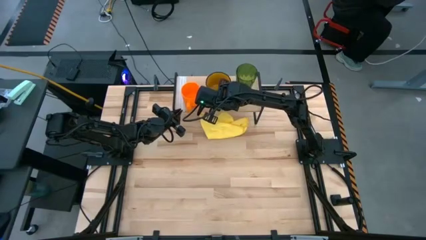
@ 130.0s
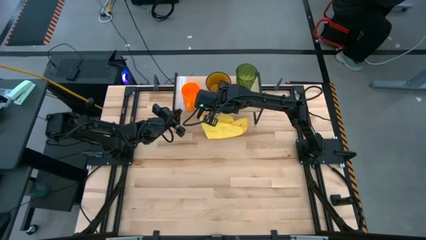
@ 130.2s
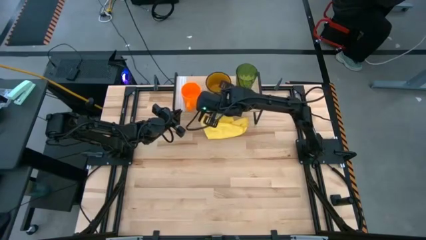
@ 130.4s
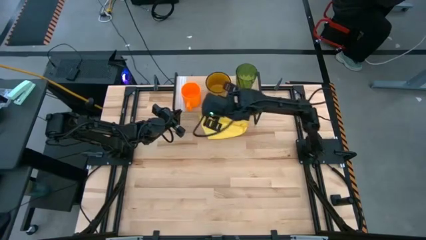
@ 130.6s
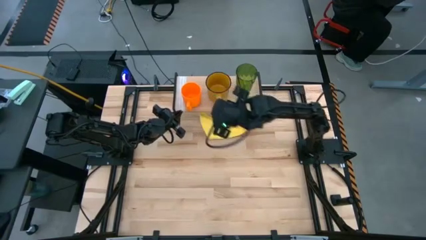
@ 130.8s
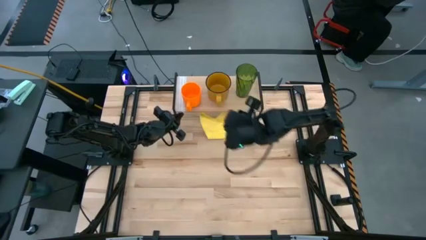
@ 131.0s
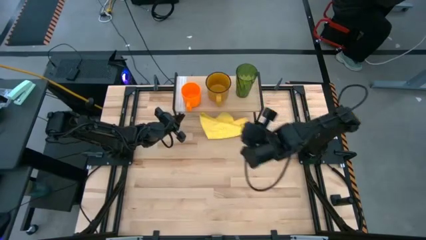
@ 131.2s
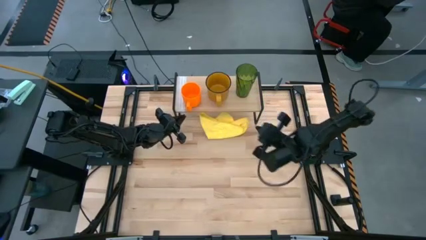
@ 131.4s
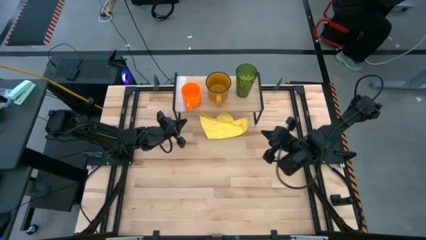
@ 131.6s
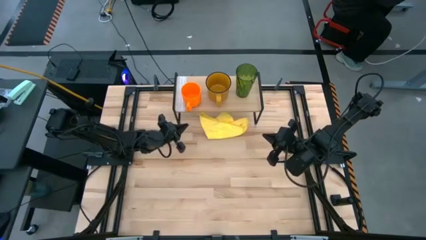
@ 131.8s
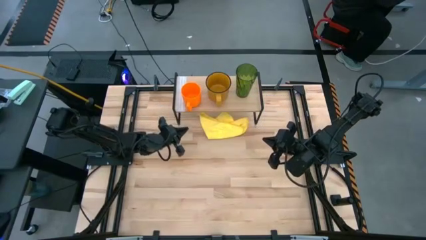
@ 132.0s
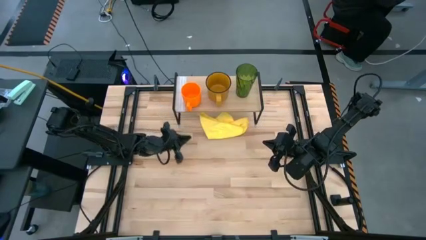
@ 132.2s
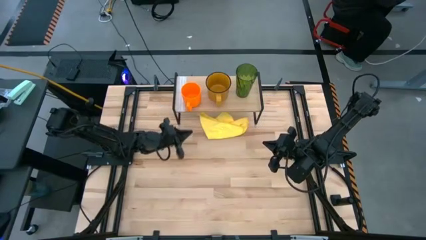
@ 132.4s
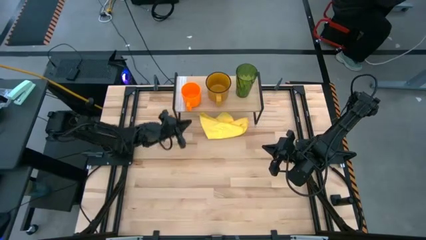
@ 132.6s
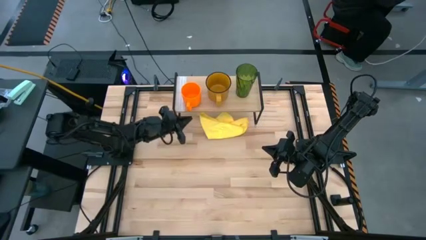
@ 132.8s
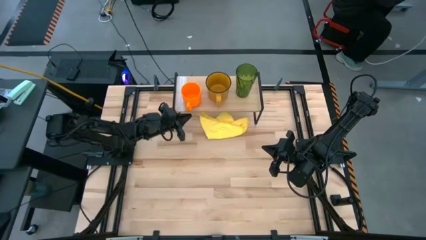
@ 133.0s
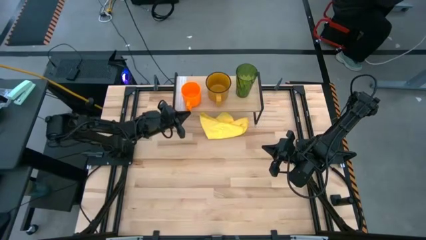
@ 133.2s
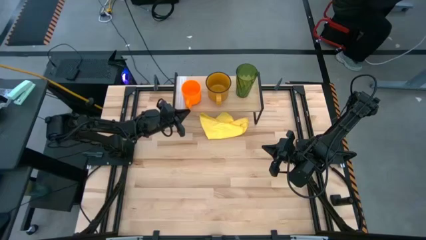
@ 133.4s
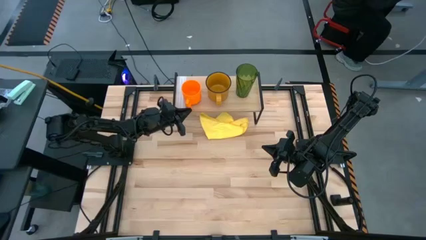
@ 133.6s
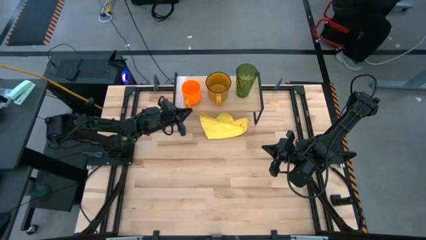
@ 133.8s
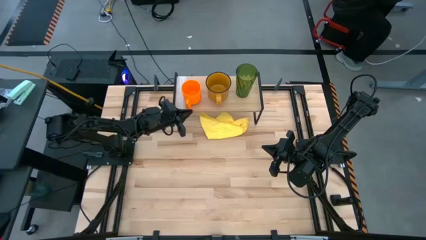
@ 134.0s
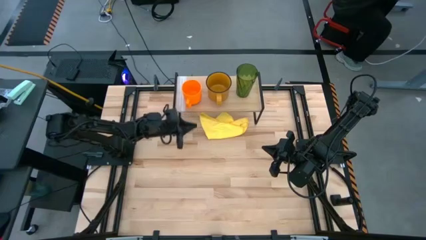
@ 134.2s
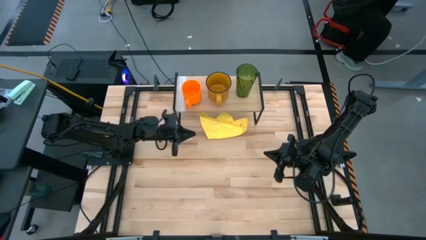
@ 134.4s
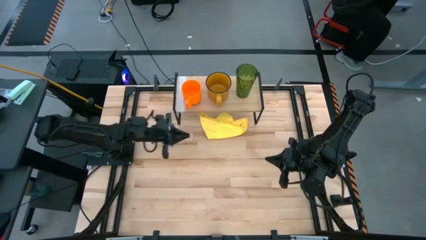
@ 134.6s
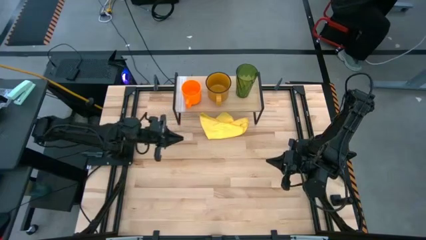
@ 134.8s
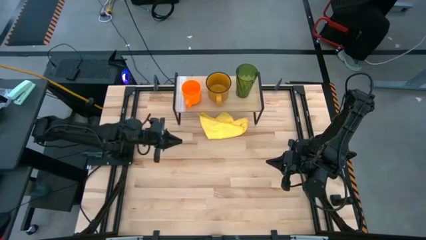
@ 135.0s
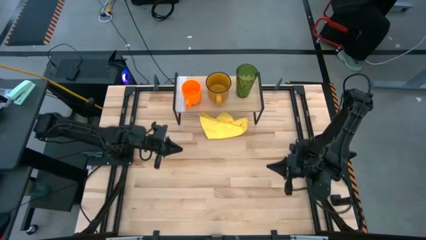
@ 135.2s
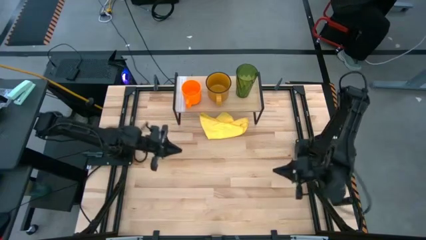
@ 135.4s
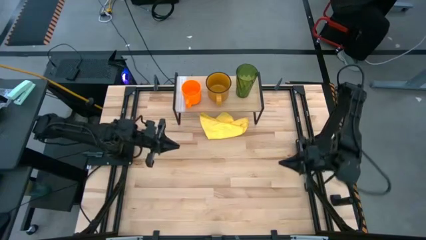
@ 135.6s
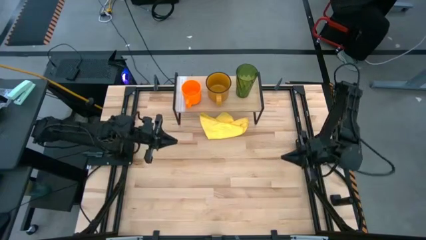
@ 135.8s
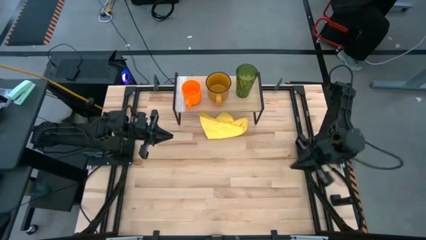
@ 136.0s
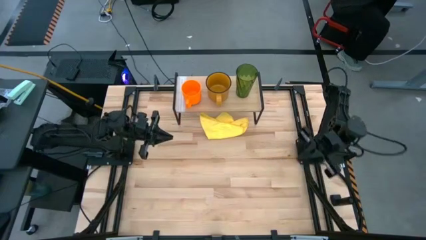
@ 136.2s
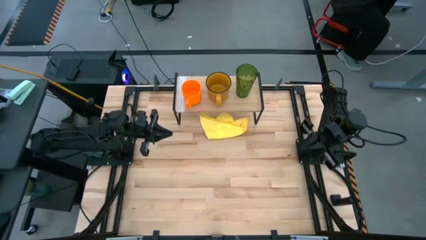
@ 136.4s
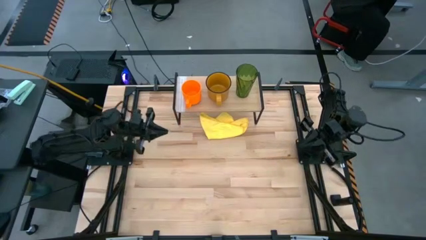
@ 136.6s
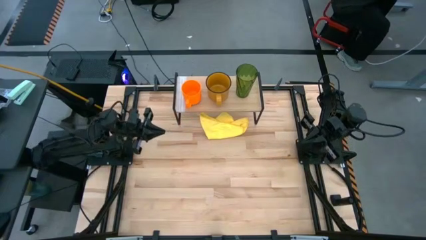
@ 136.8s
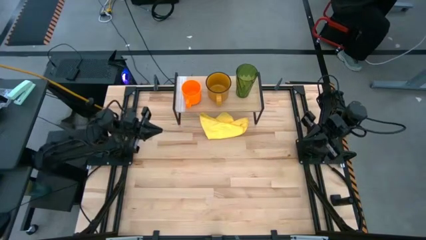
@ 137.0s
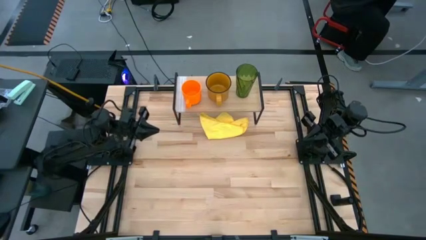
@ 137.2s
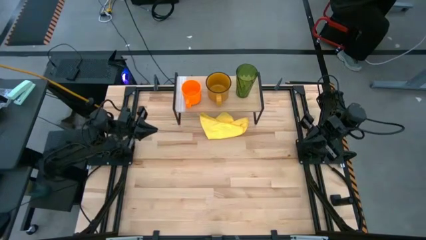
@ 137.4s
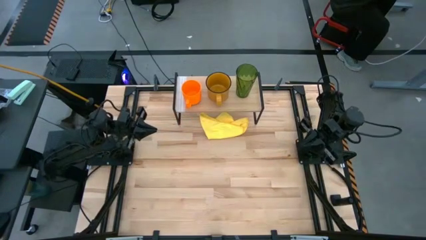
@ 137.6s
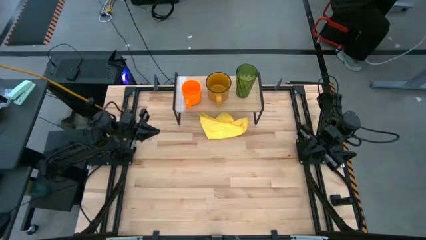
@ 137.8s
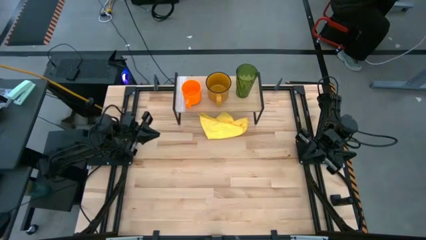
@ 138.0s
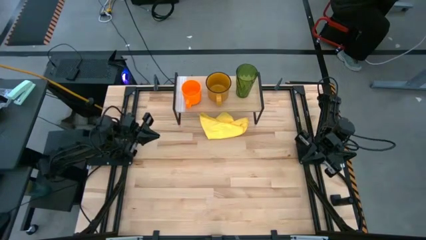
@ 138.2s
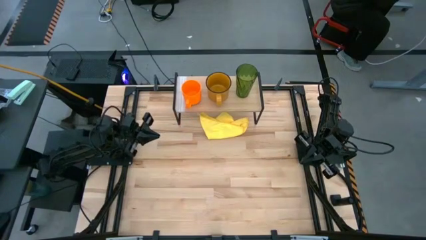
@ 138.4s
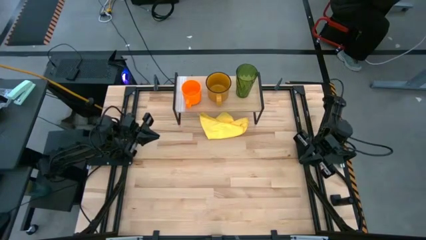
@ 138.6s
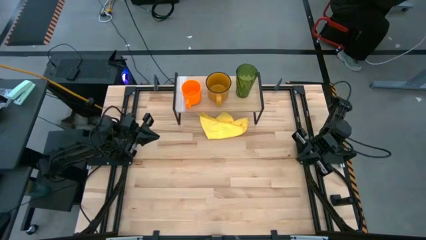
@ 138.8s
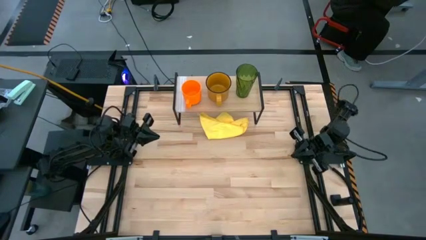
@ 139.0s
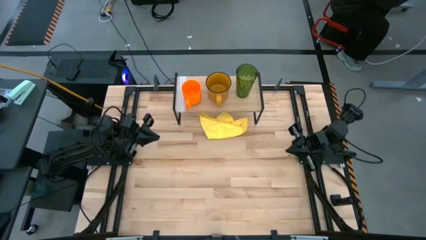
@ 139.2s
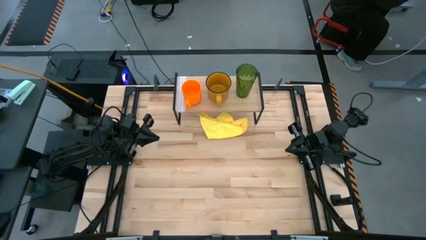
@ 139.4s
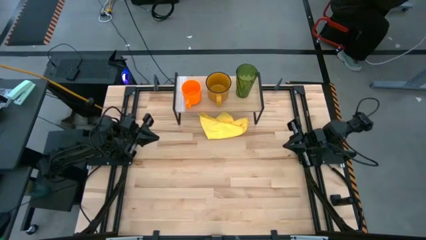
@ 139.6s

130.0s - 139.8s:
Task: Stack small to large cups/mugs on shelf
Return to Home Position

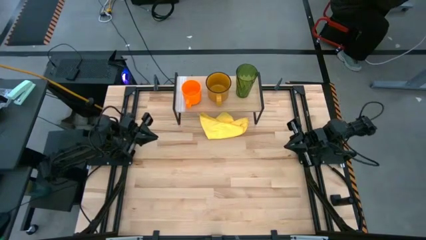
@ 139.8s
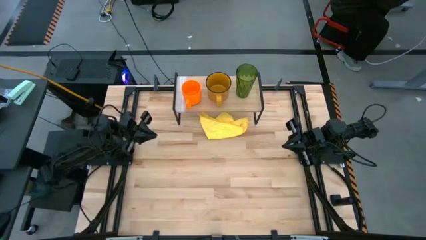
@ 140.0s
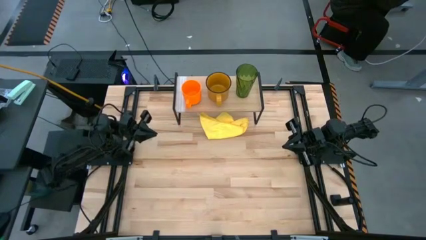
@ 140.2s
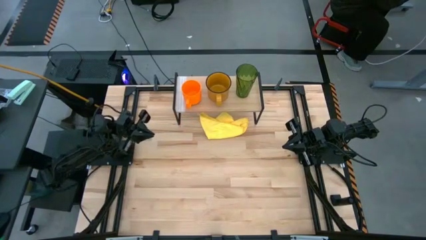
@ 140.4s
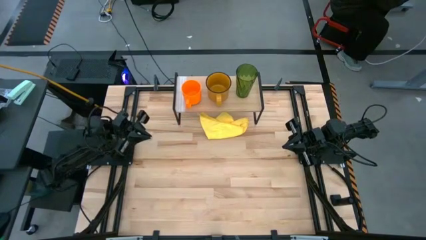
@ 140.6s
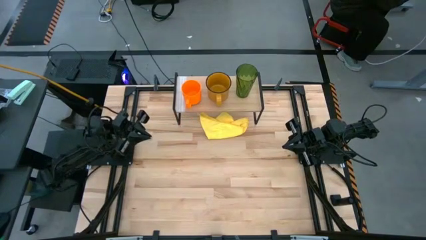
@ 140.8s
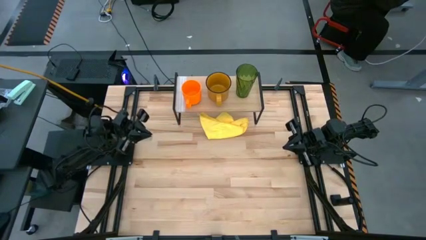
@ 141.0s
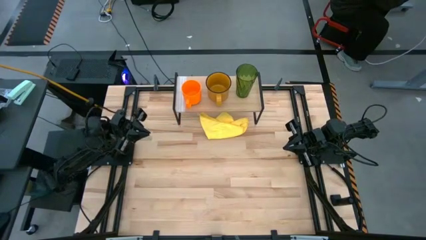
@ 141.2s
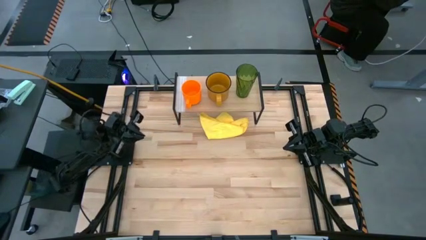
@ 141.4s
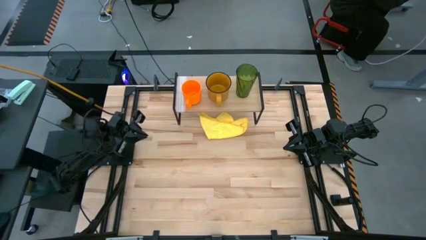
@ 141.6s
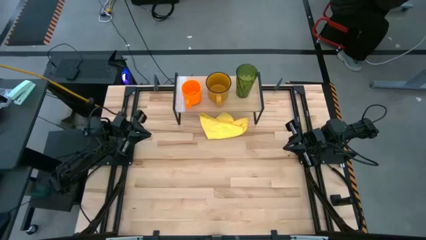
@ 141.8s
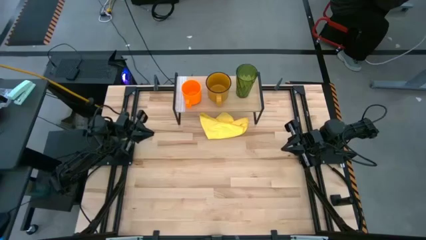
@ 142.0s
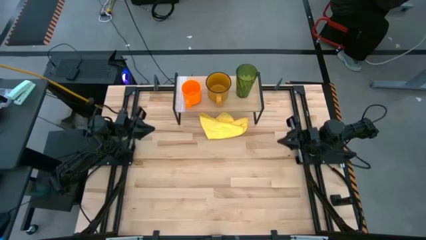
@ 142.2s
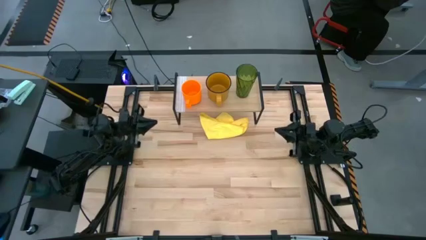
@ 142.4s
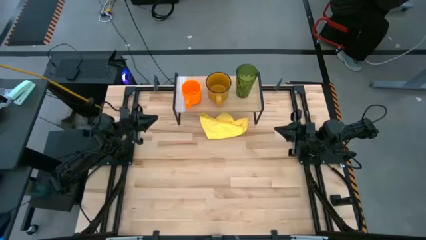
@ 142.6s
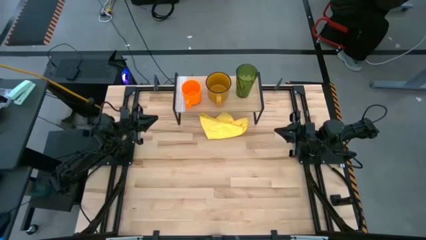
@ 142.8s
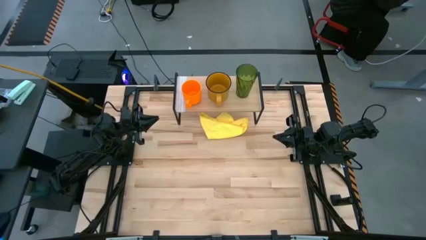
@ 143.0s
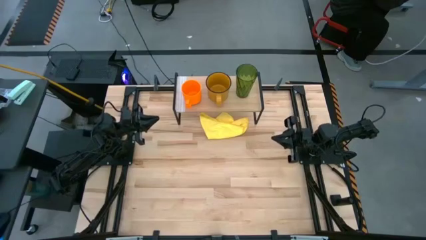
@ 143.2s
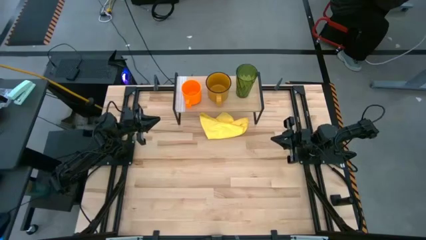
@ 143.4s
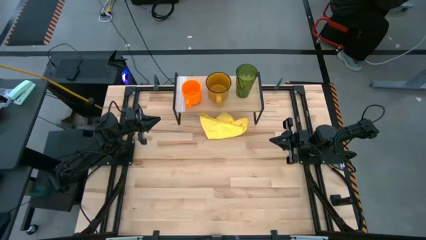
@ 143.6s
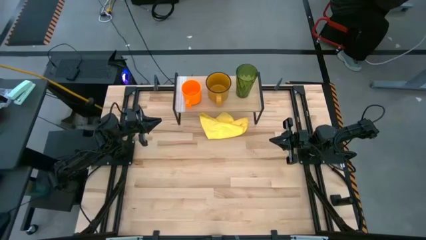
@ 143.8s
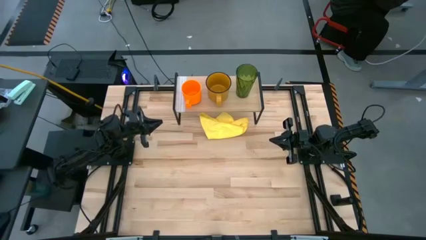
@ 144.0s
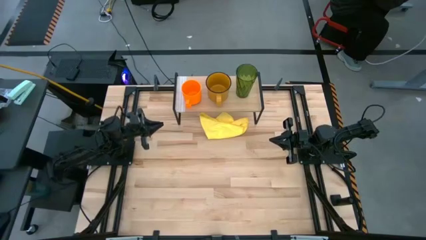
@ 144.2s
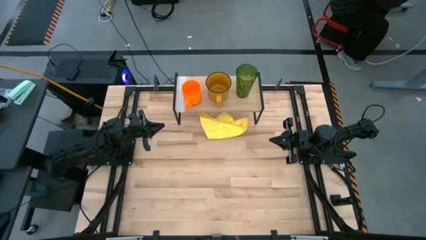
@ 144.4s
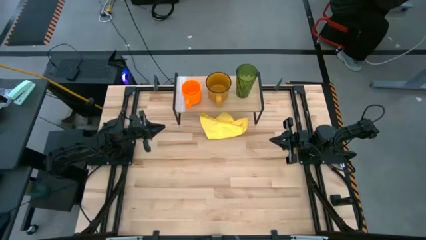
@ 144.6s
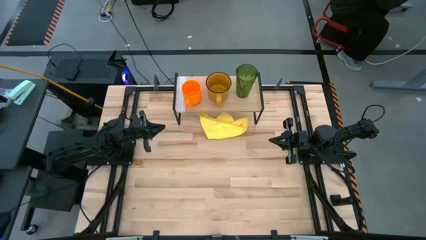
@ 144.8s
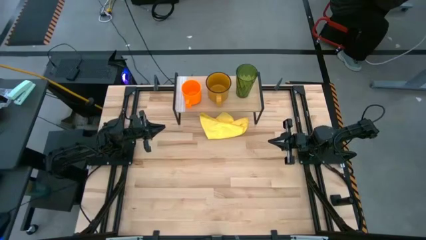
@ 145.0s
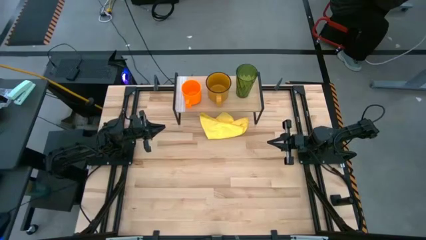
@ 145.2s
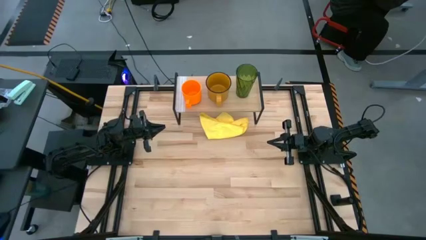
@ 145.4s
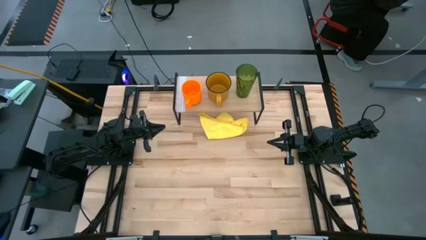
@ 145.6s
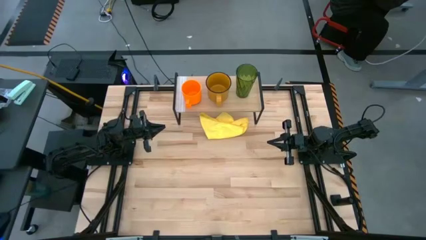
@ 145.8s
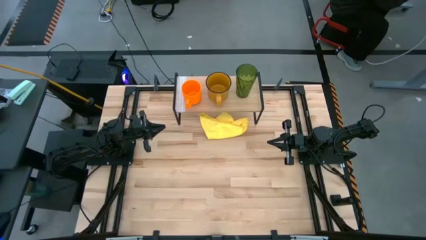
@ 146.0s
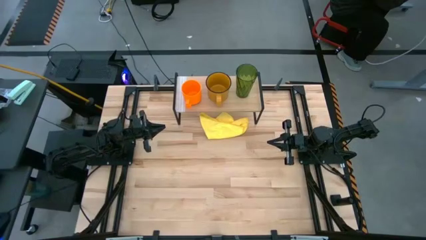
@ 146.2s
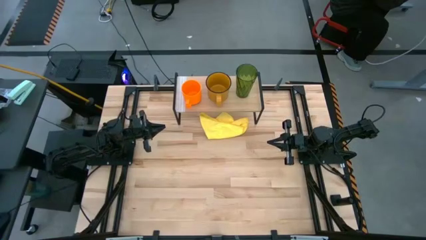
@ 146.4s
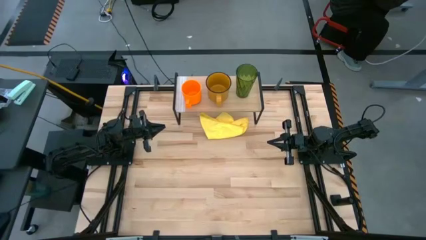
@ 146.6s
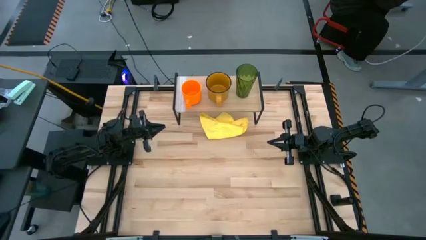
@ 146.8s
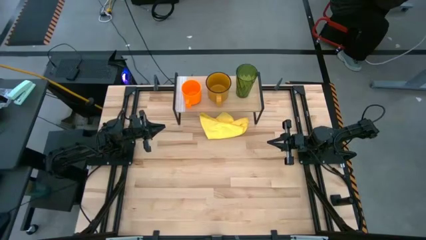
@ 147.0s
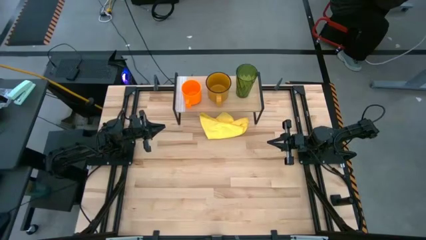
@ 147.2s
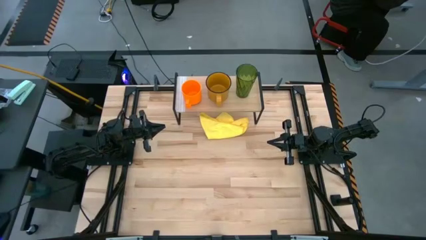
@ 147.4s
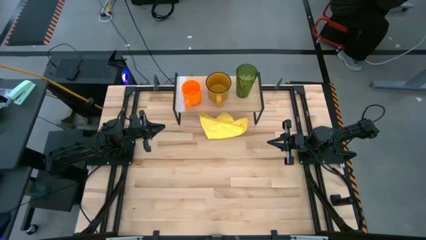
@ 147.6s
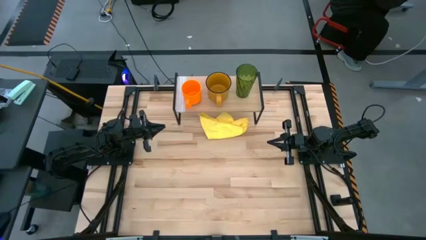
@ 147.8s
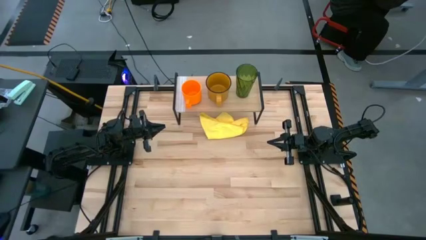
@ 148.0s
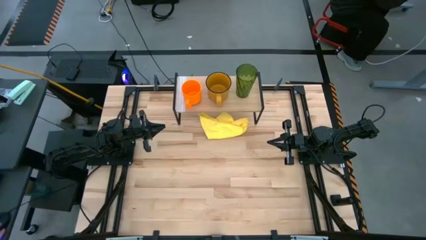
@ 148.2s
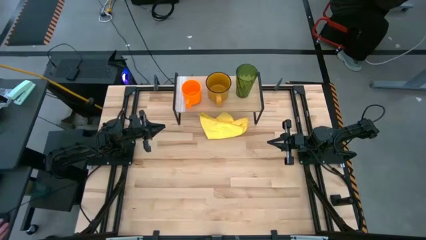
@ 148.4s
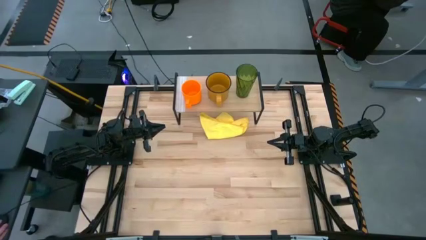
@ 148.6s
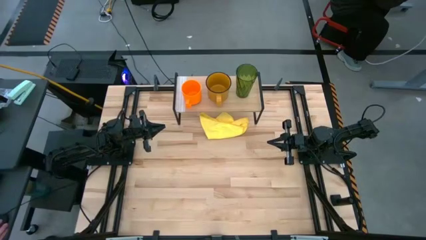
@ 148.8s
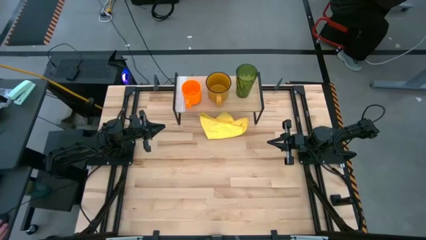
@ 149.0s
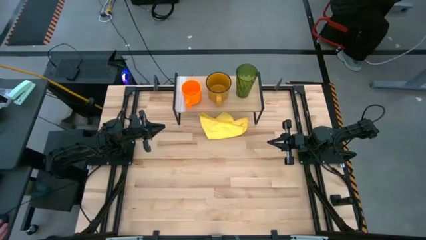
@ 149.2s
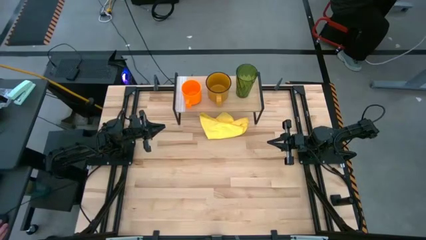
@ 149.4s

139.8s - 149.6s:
Return to Home Position
